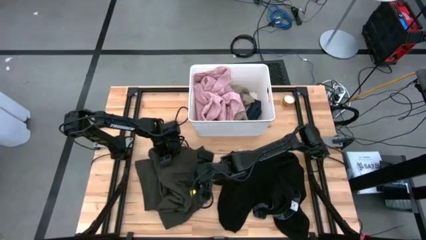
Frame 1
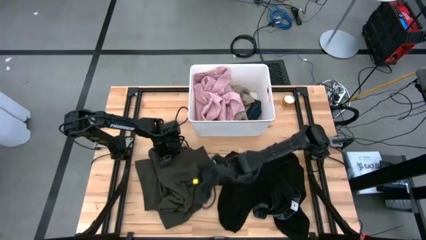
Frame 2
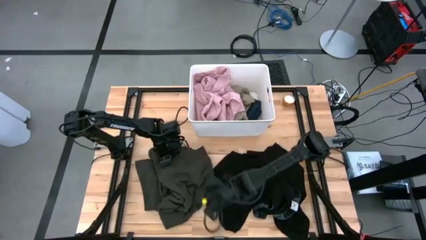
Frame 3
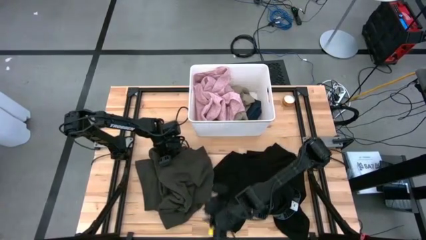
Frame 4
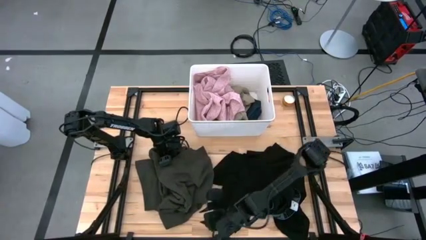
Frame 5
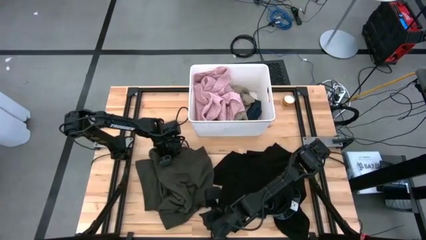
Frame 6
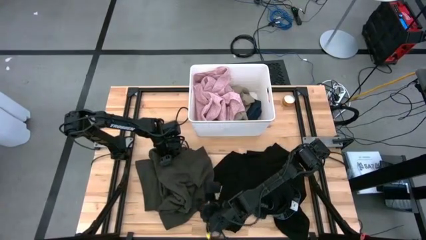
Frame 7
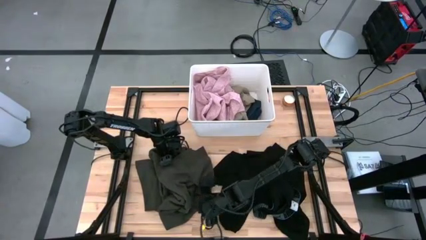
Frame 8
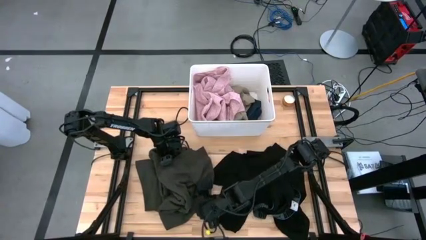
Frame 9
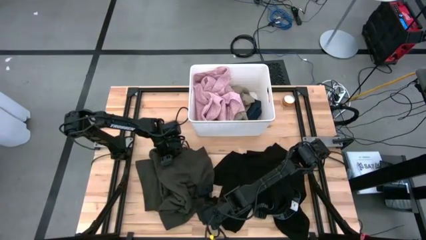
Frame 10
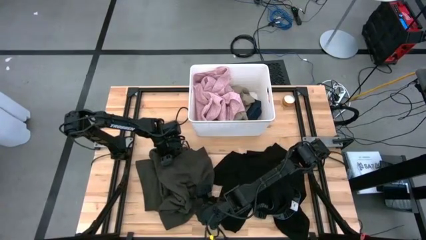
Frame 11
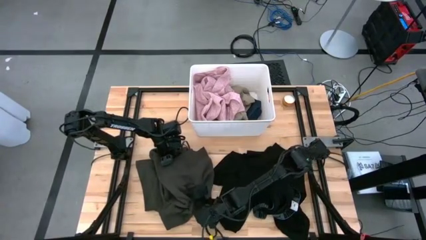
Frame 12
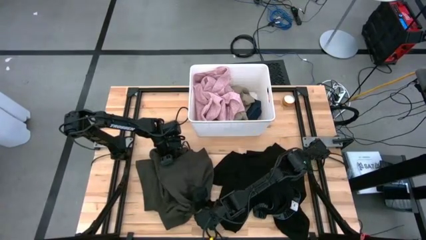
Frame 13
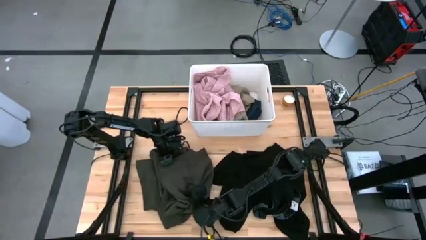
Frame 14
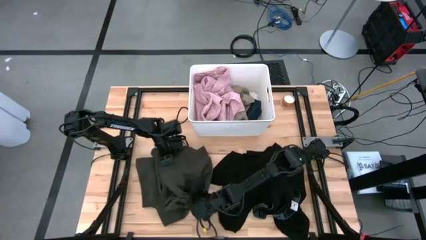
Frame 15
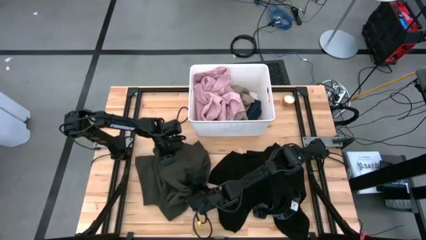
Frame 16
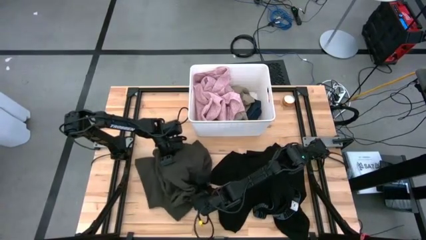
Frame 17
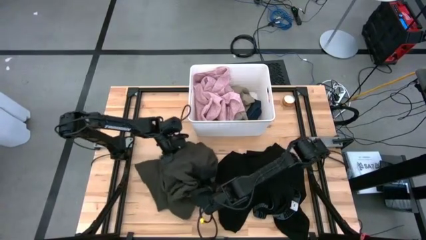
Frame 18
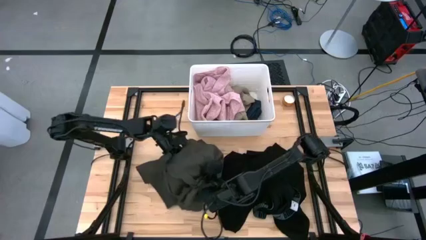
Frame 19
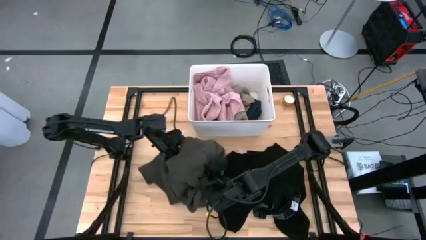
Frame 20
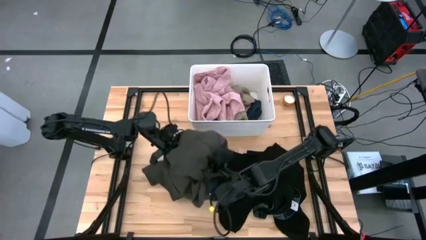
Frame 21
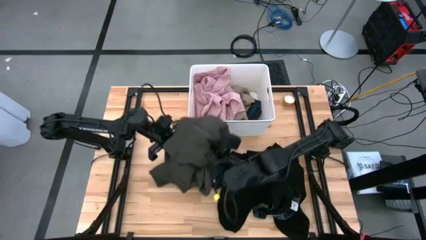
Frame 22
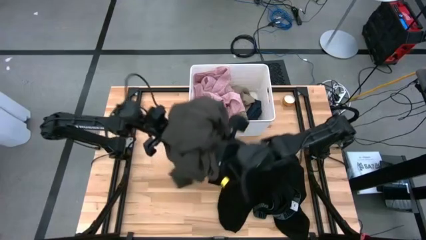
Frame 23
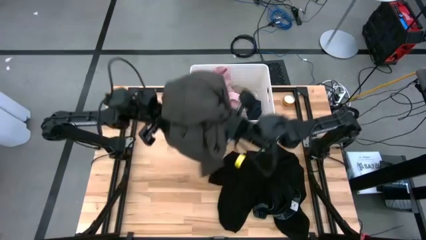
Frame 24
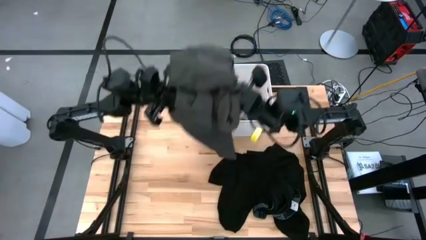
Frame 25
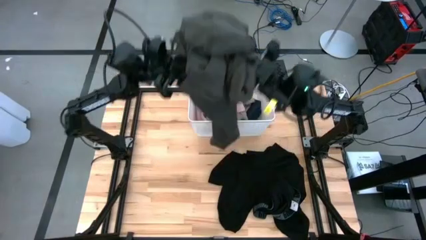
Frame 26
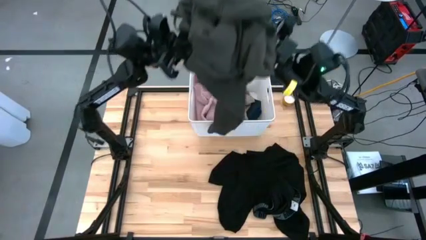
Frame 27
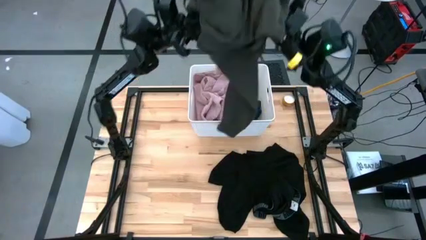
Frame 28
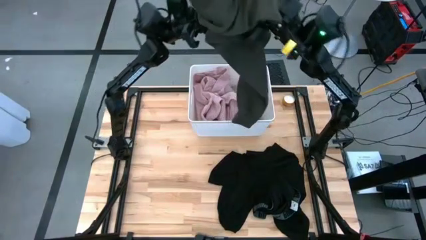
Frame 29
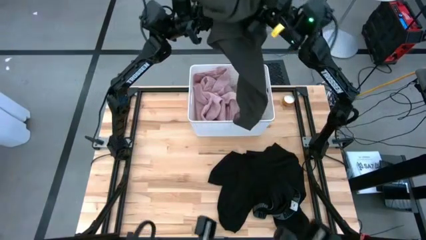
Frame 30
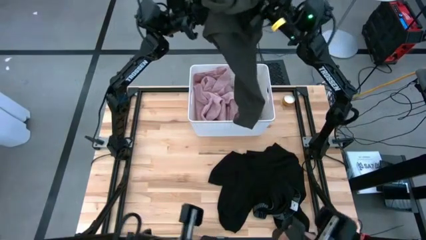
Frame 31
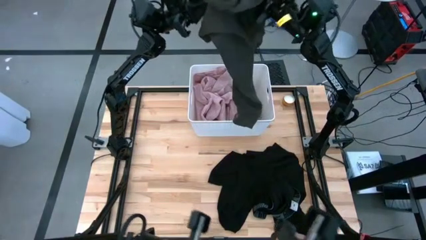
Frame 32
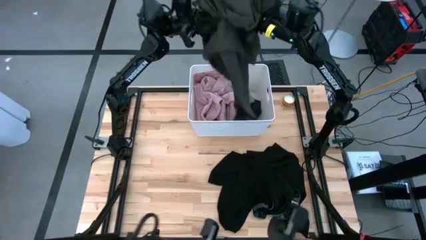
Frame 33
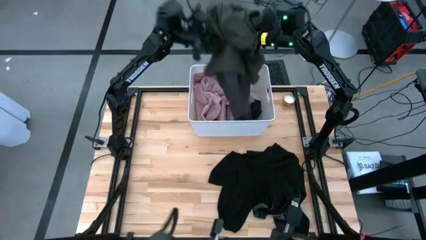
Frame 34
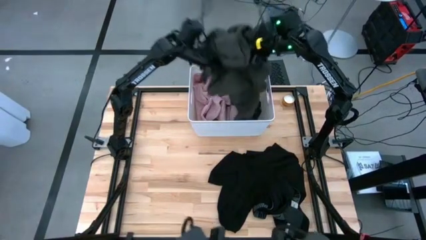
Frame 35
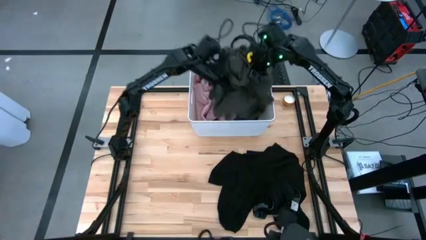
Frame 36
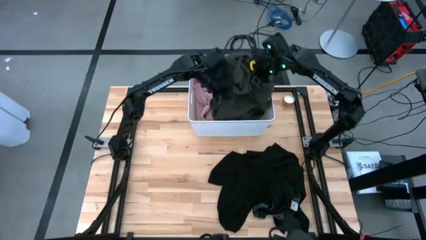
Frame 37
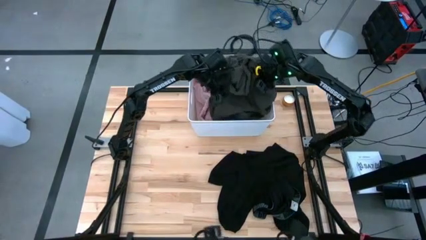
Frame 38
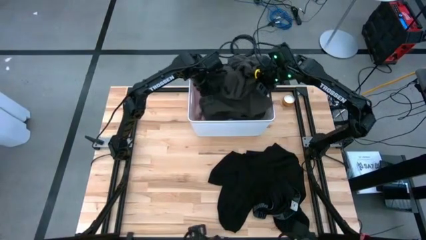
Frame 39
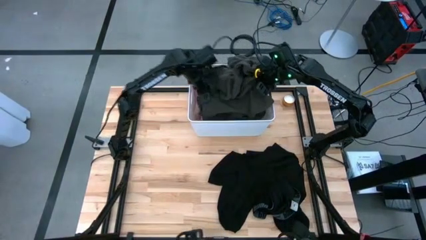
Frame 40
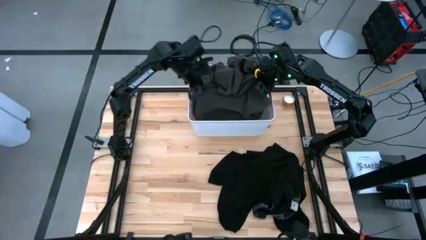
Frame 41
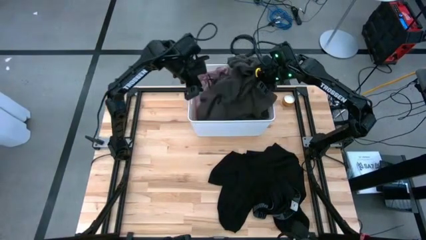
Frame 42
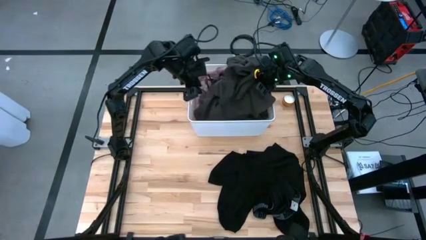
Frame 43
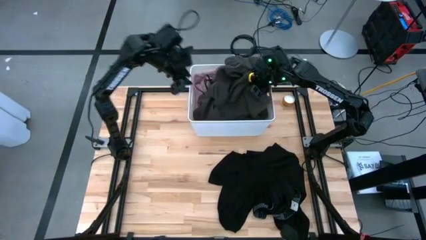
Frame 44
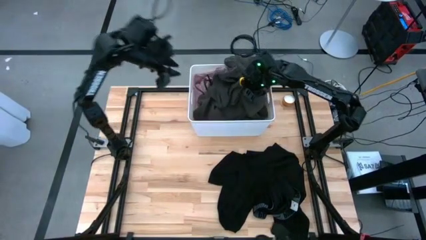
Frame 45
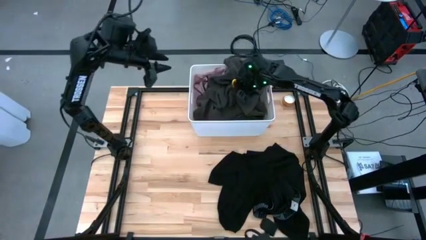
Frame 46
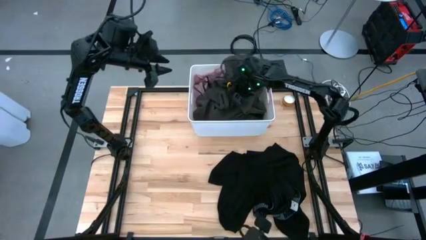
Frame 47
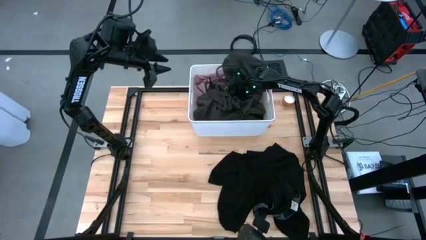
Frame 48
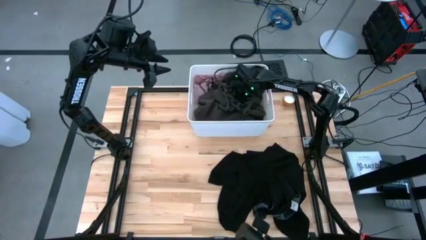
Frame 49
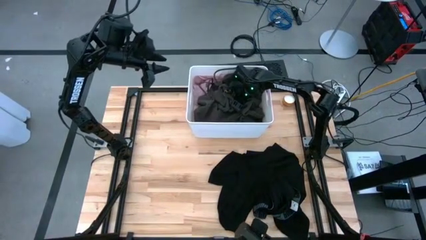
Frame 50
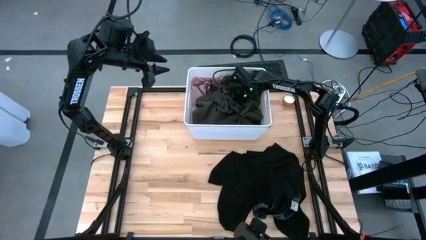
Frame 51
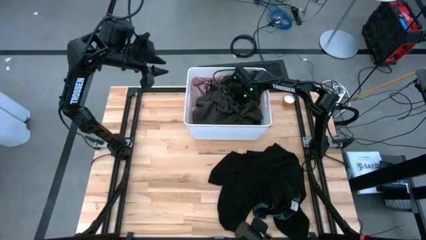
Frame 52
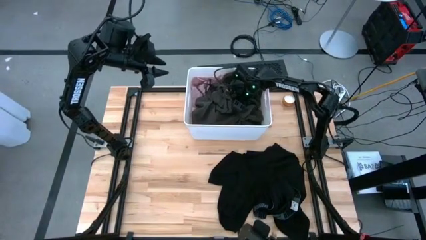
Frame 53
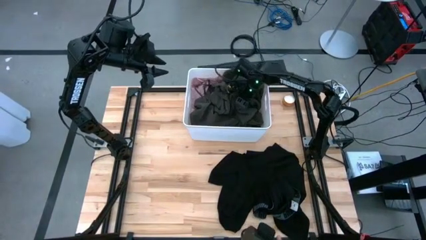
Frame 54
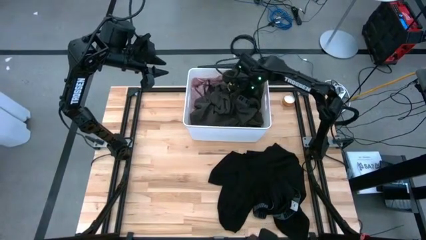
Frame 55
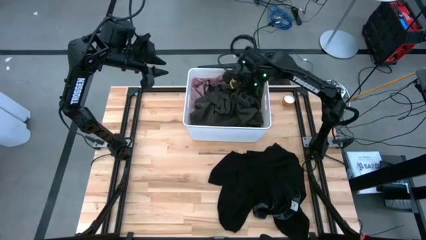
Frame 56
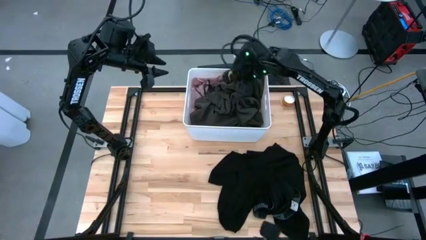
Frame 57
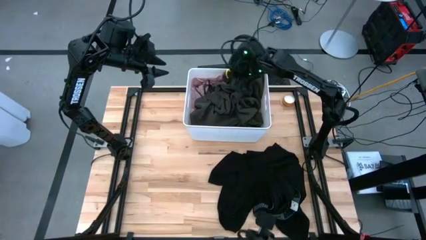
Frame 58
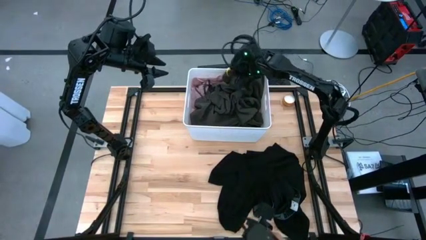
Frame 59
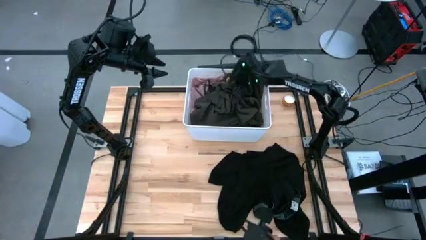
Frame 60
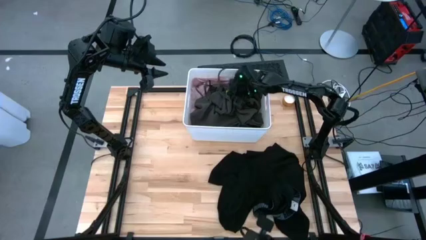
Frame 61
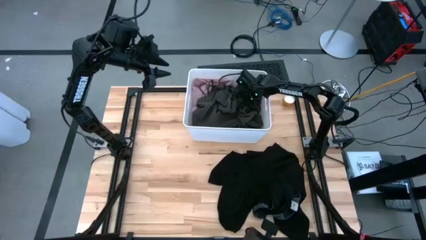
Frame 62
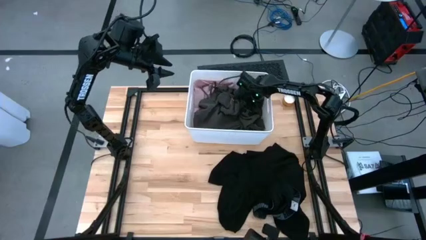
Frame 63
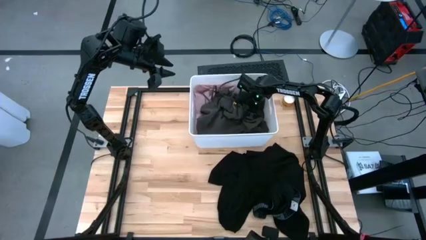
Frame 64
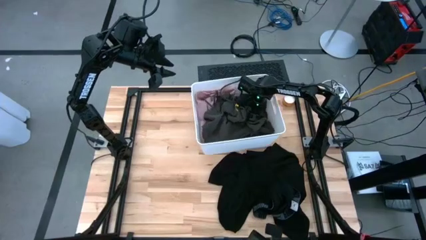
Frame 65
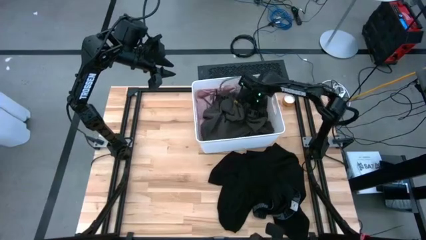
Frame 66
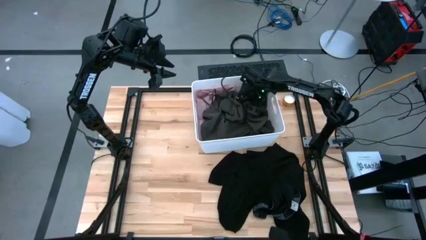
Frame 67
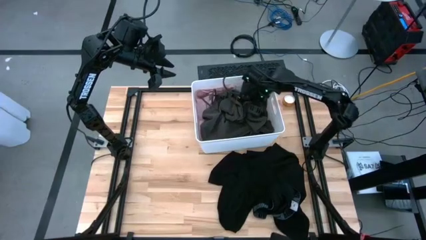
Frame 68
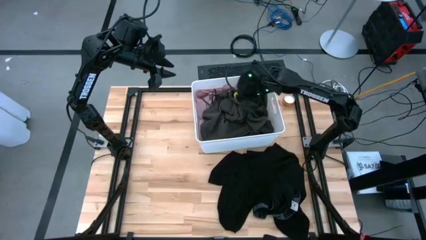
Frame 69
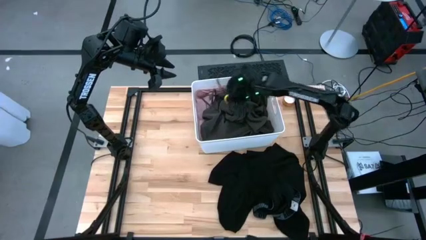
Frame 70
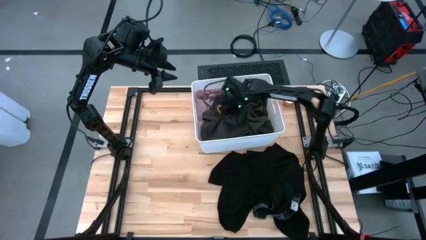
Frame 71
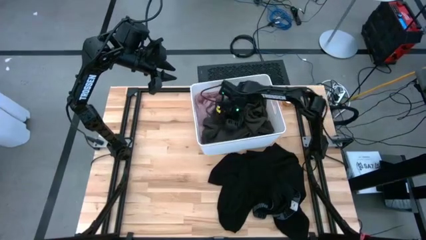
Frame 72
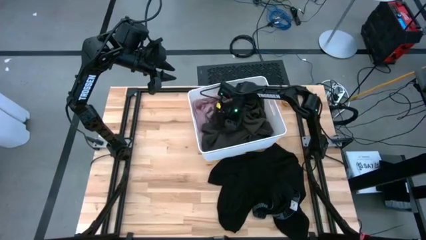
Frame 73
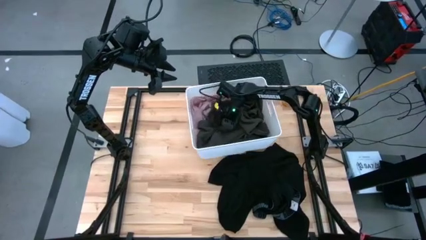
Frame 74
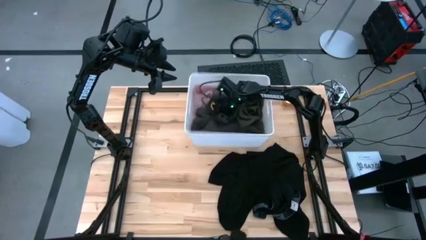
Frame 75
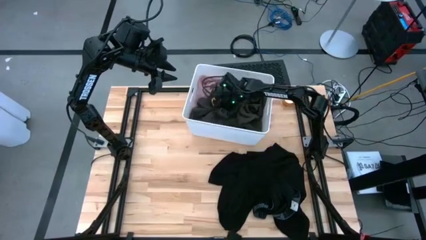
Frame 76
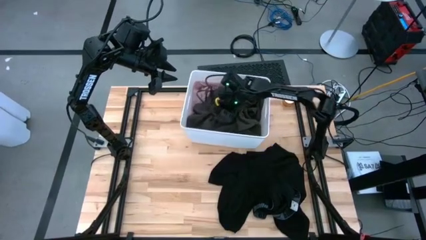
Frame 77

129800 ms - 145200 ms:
Task: Sort clothes
Put the gray jacket into the laundry organizer bin
